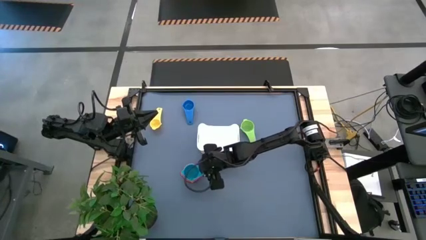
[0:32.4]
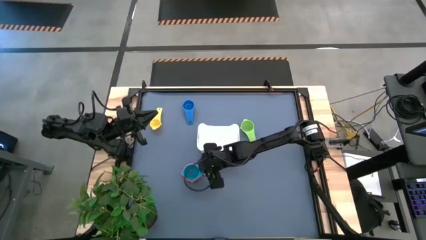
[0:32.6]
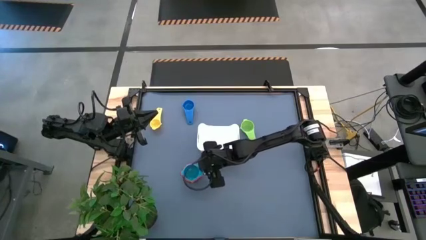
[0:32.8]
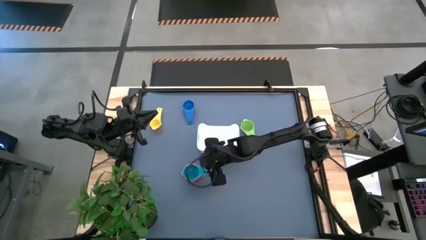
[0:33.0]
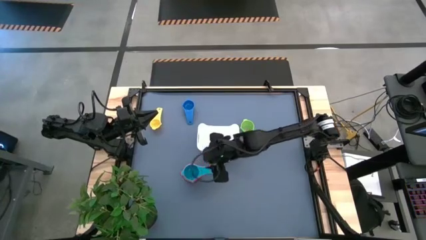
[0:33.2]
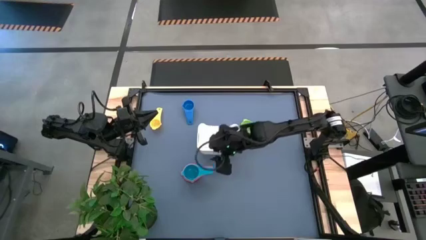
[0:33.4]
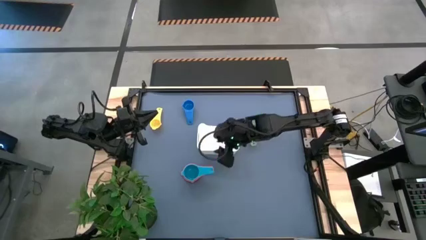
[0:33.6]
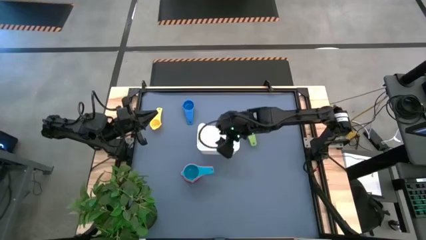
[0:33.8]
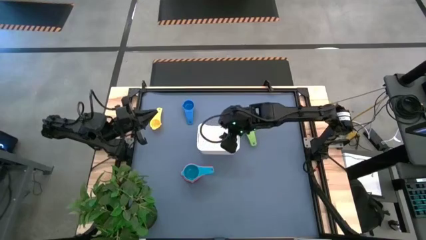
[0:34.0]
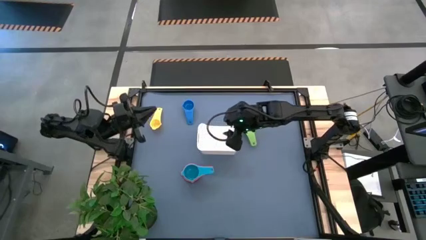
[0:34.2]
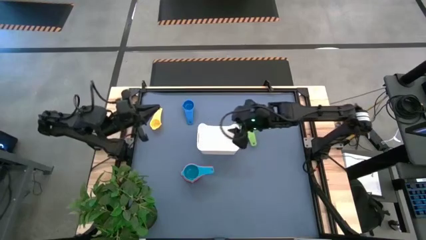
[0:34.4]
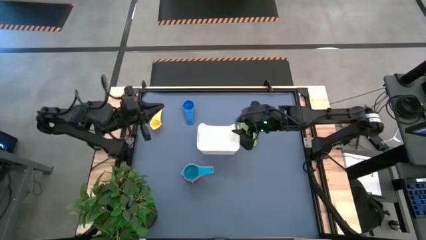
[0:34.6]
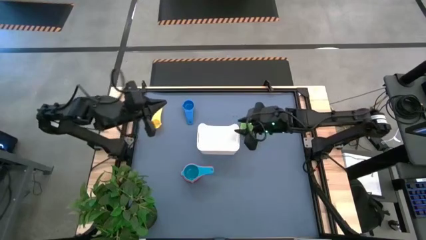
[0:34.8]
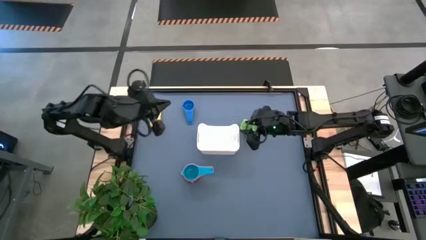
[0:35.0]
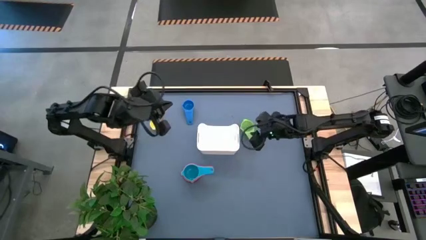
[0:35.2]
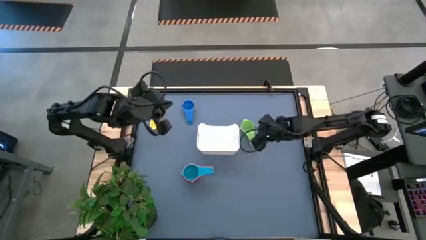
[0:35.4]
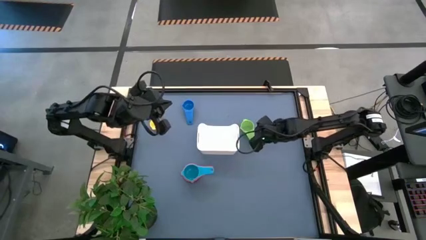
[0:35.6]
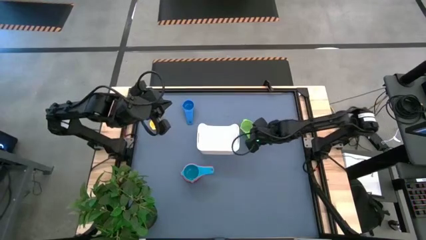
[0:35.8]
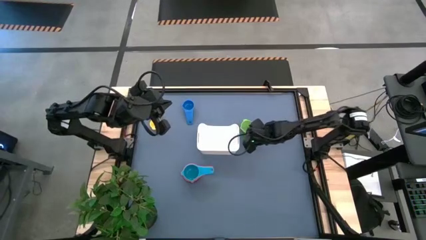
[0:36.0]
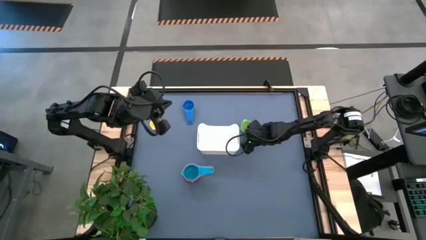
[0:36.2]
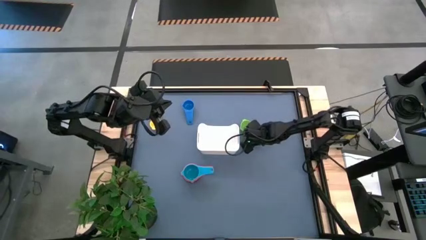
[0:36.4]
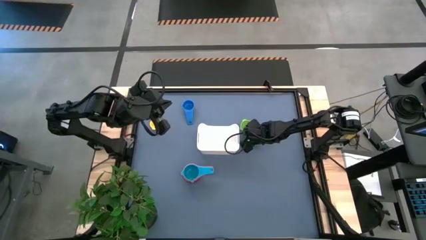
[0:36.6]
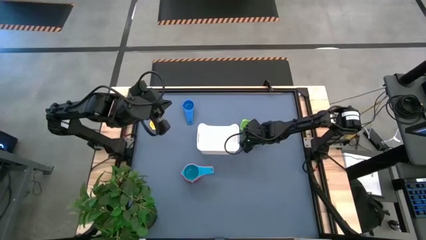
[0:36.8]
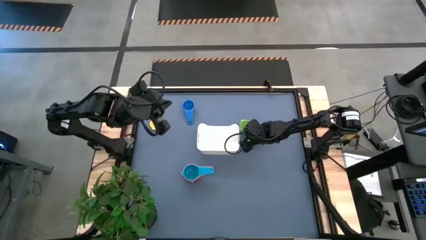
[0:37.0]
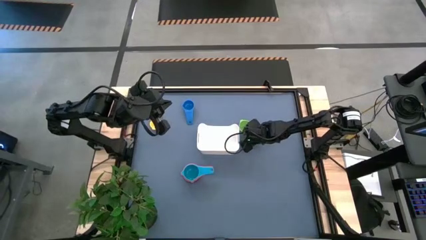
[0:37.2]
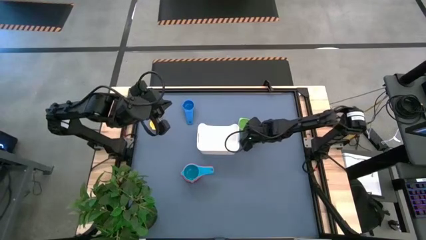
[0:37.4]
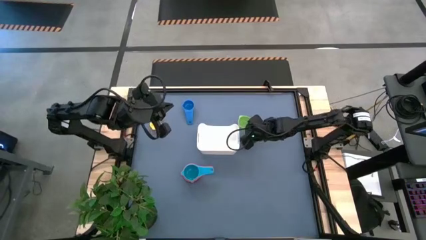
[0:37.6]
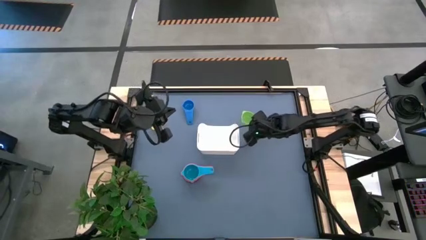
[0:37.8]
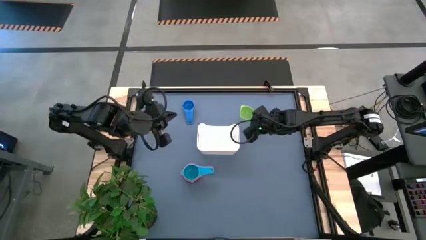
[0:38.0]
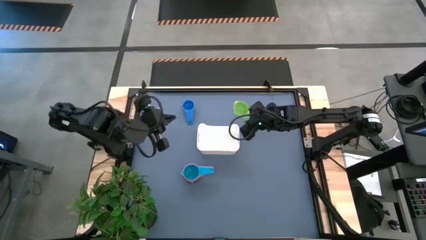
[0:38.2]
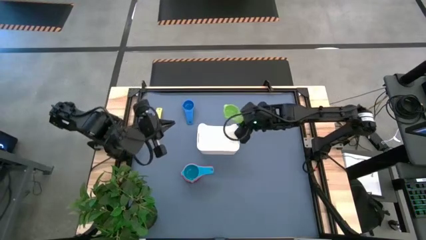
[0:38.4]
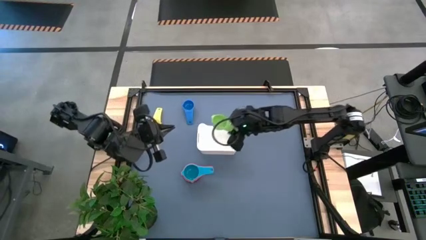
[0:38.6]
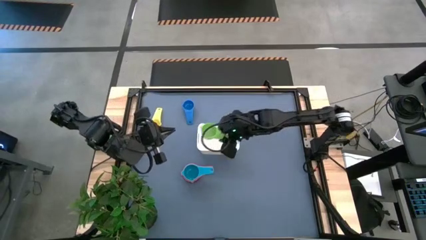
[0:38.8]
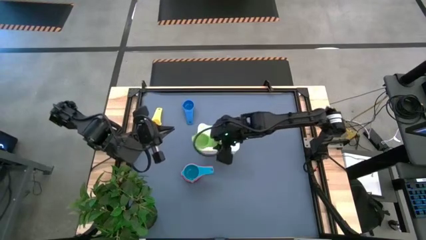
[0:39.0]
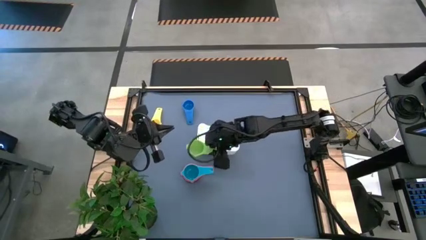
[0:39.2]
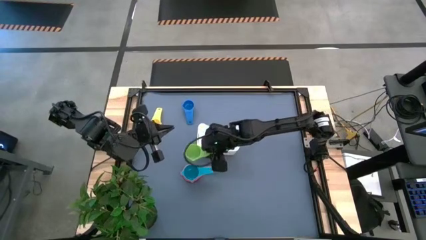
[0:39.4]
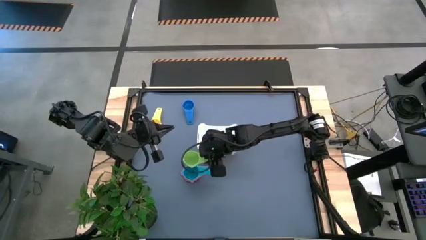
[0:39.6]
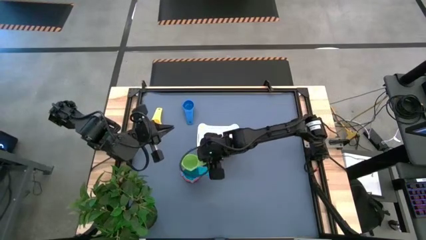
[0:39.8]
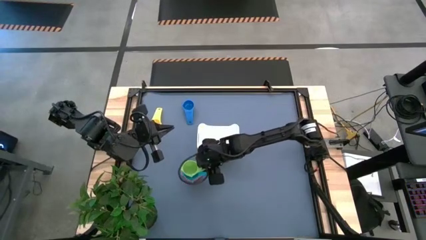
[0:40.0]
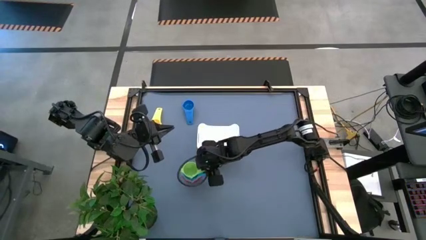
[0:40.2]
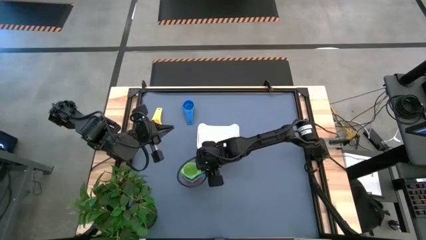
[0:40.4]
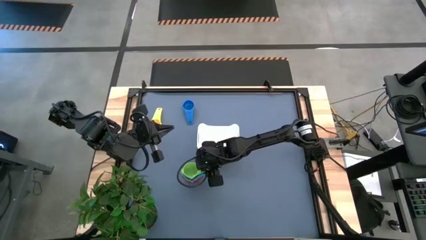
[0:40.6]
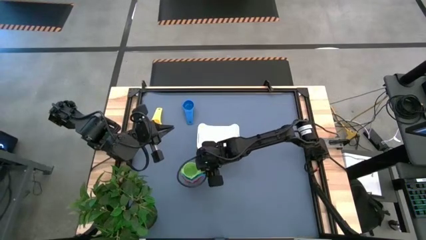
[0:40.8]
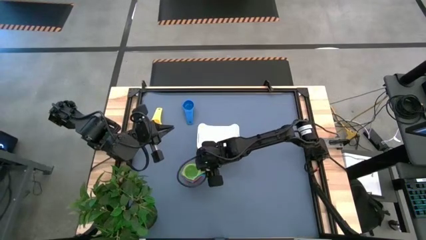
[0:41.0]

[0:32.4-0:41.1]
Task: Nest measuring cups in basket
Stack the green measuring cup on the light blue measuring cup

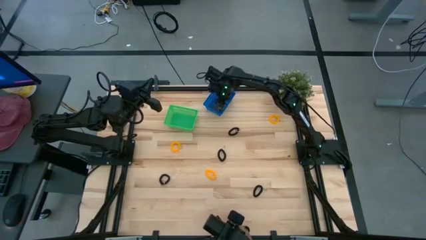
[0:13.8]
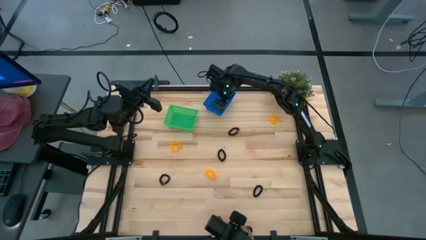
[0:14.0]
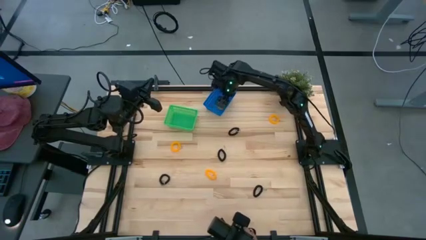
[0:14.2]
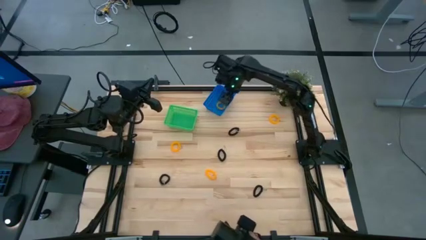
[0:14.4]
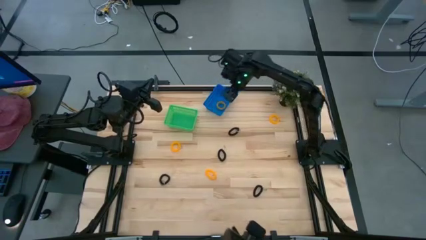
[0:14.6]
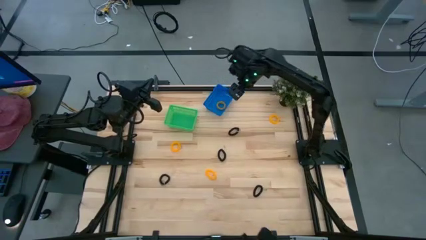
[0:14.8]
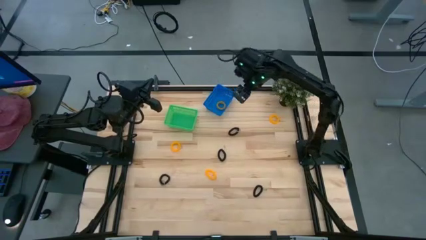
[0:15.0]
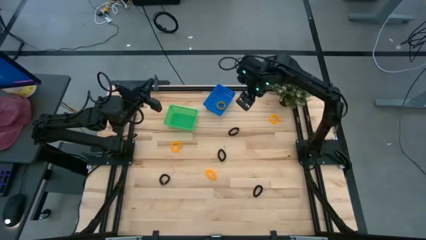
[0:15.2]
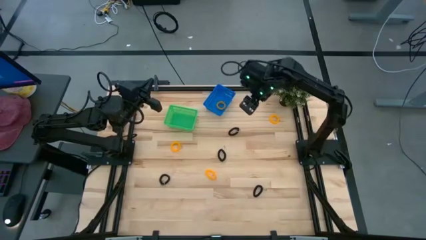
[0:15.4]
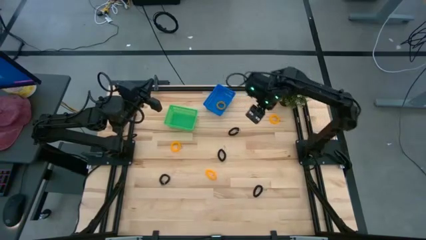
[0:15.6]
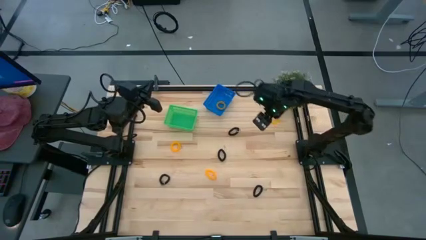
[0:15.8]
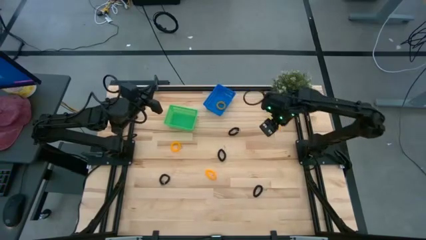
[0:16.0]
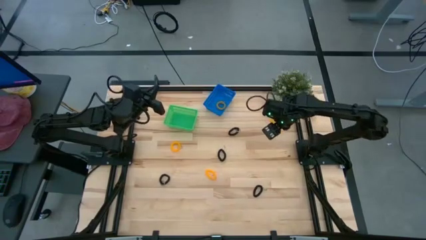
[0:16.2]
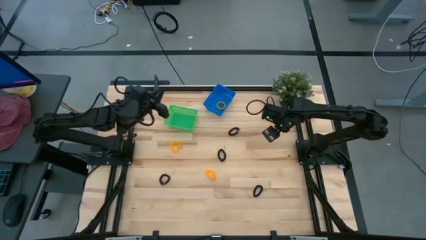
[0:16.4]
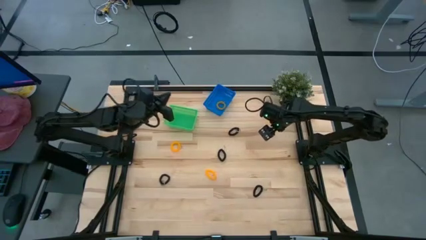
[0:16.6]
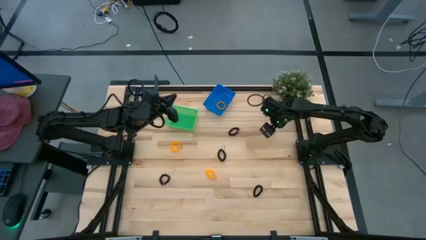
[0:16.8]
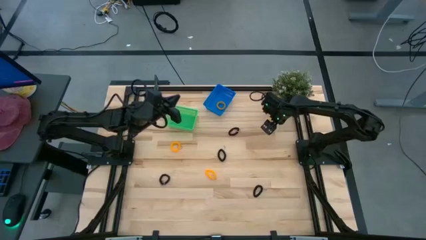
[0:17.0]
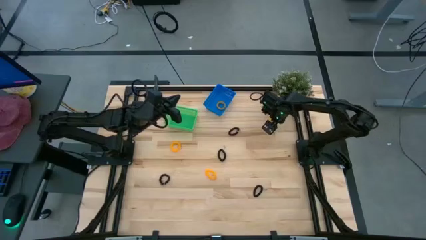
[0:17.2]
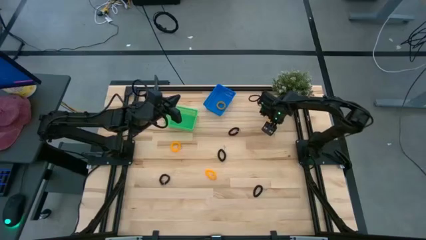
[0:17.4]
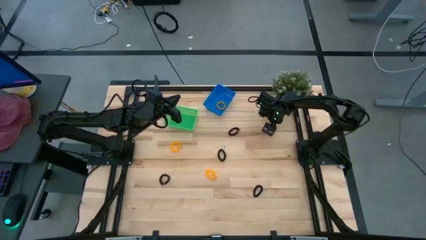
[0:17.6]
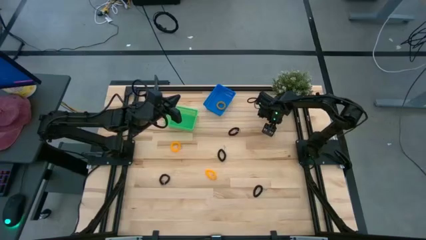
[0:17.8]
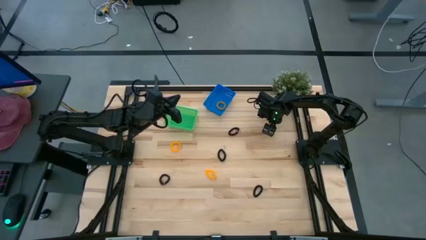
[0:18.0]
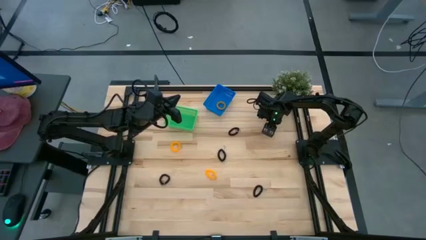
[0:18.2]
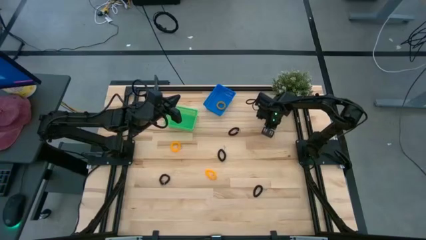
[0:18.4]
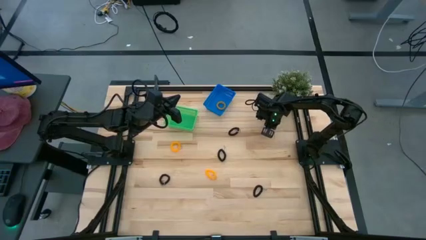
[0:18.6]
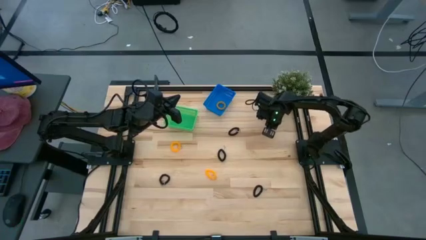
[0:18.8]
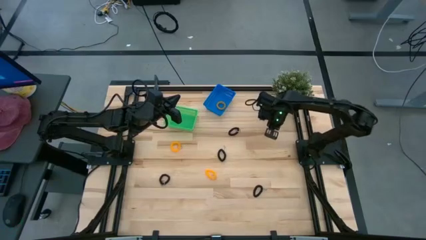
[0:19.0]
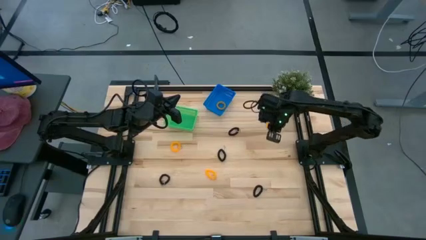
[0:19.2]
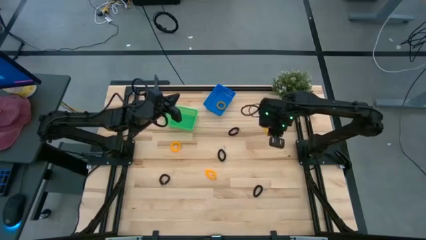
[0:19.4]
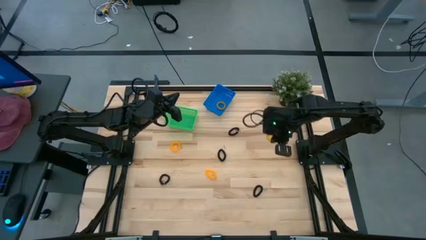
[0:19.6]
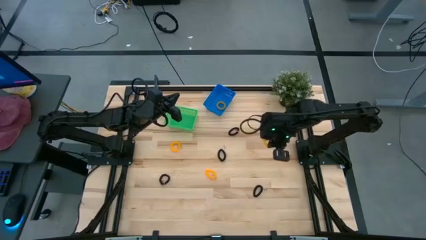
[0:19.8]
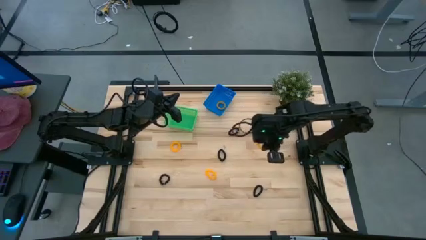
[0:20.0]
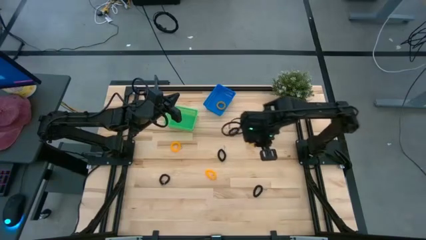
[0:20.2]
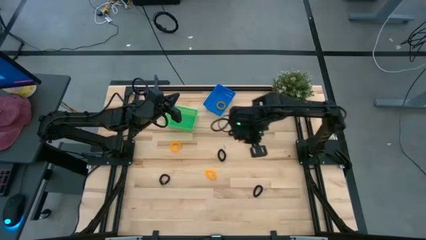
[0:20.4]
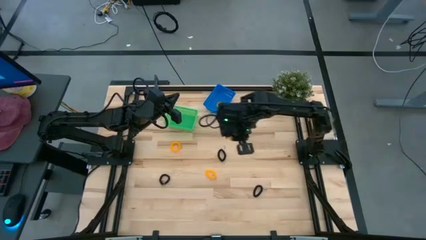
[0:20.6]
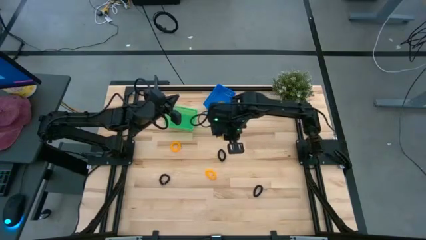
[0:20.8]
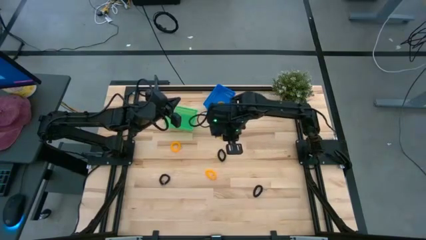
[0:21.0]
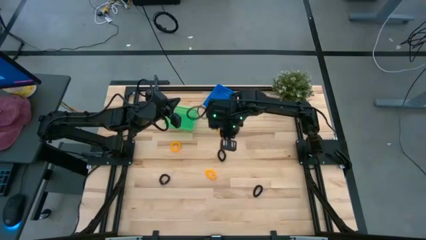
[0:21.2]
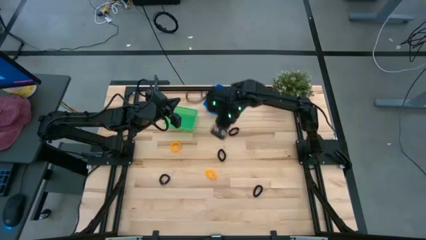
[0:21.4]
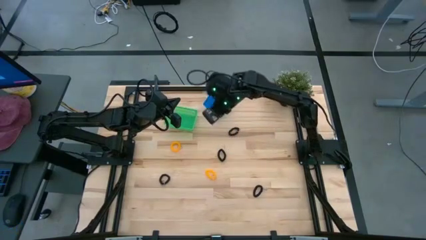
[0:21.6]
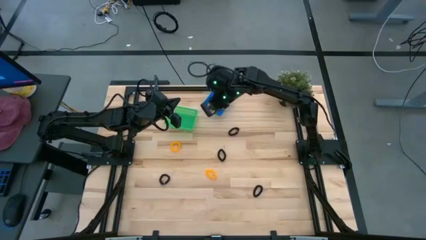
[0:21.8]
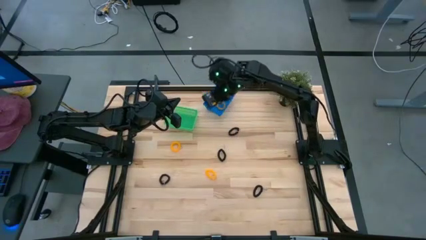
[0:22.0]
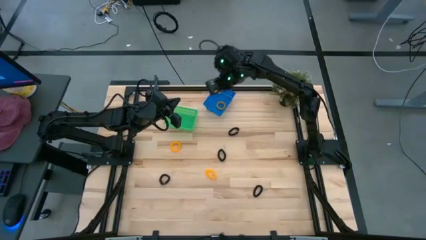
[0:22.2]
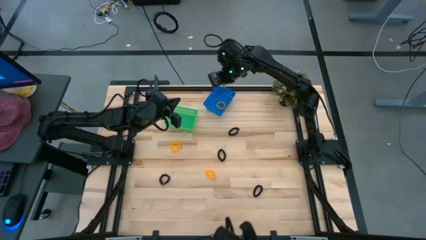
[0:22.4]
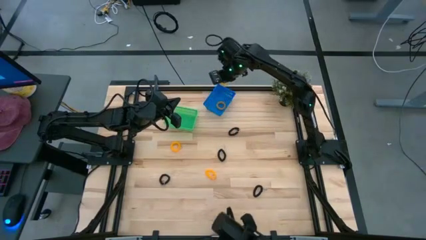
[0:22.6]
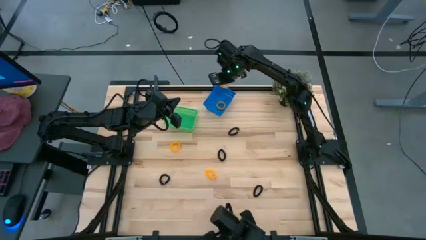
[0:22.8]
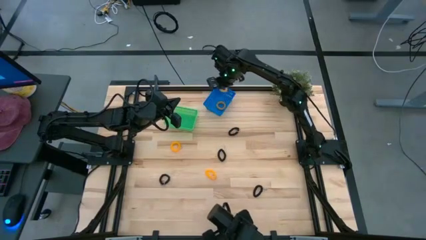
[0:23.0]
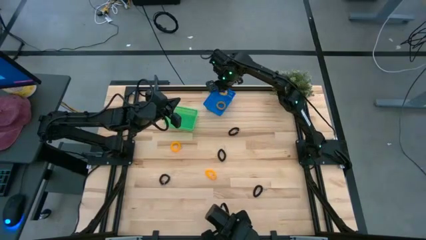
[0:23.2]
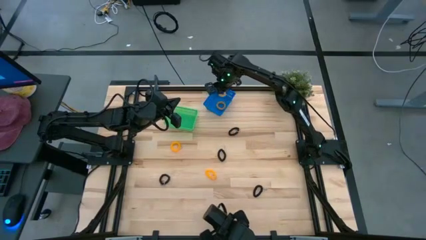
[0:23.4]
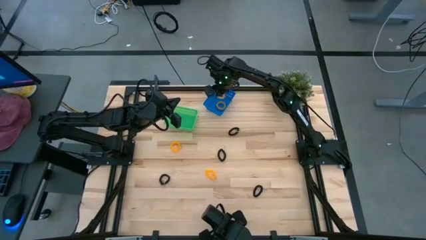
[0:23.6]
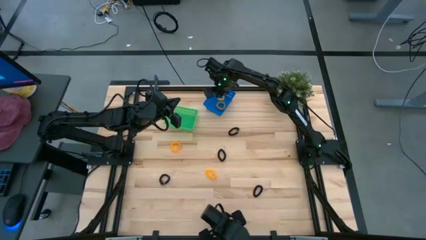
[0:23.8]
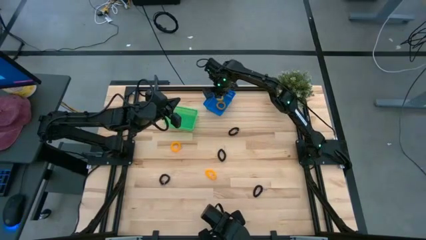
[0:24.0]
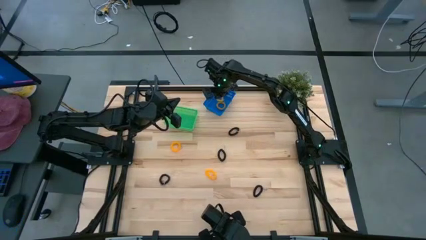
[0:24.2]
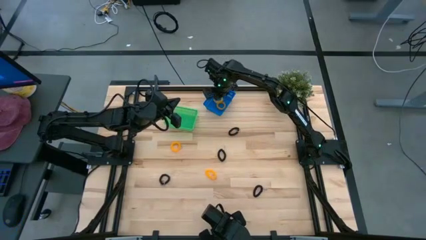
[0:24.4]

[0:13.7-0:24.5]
Task: Sort spring keychains into baskets
Put the yellow spring keychain into the blue basket
